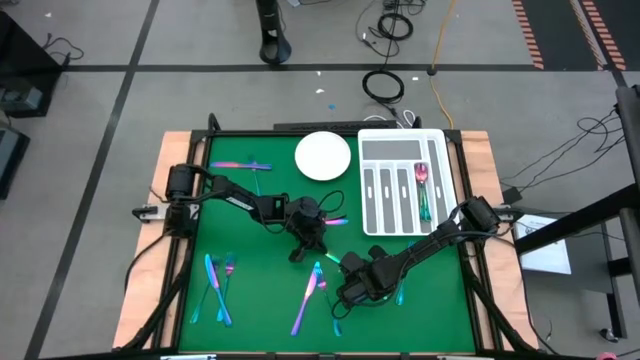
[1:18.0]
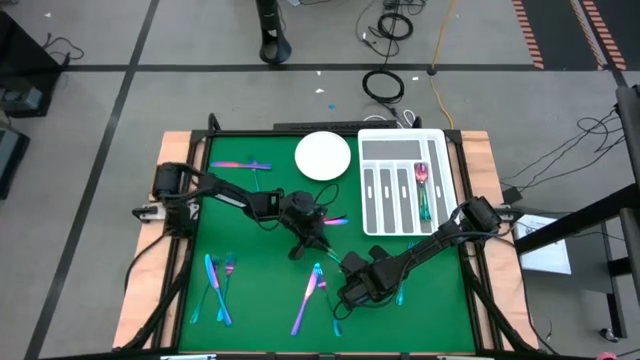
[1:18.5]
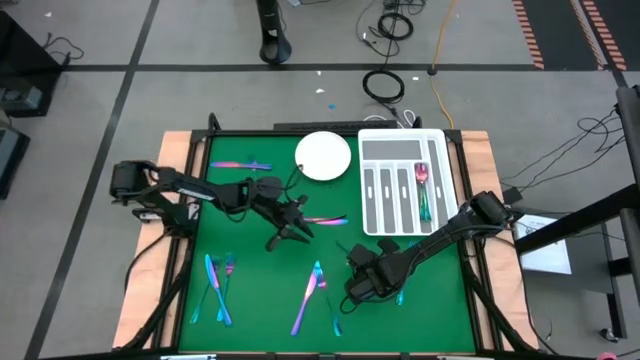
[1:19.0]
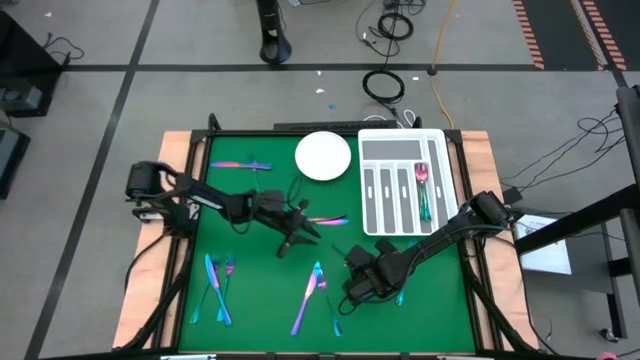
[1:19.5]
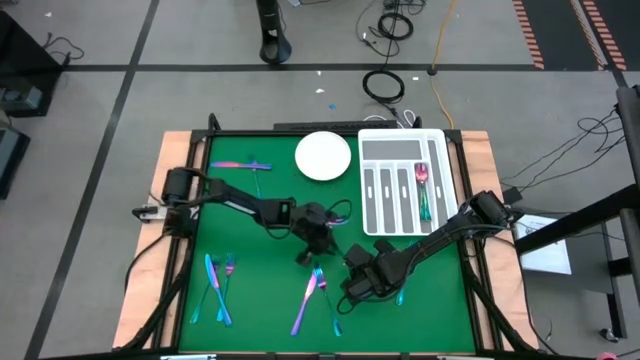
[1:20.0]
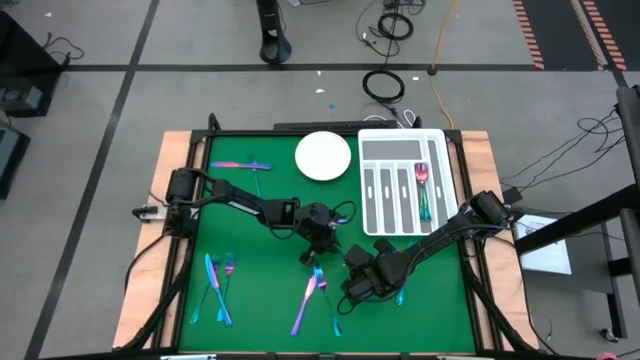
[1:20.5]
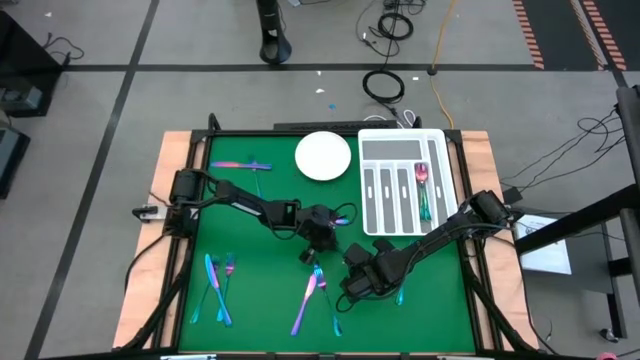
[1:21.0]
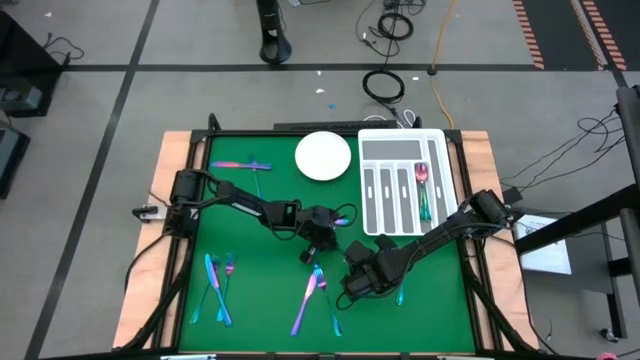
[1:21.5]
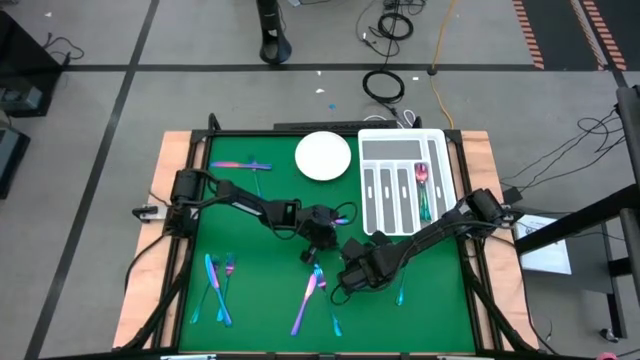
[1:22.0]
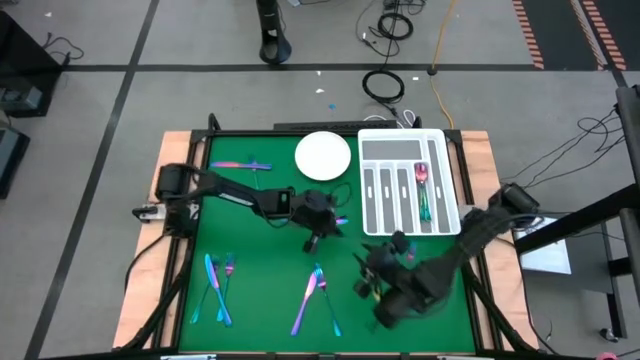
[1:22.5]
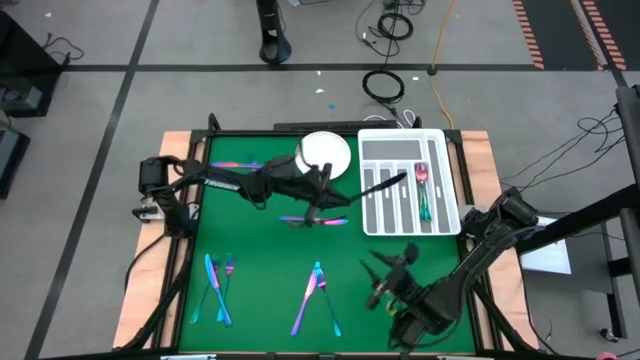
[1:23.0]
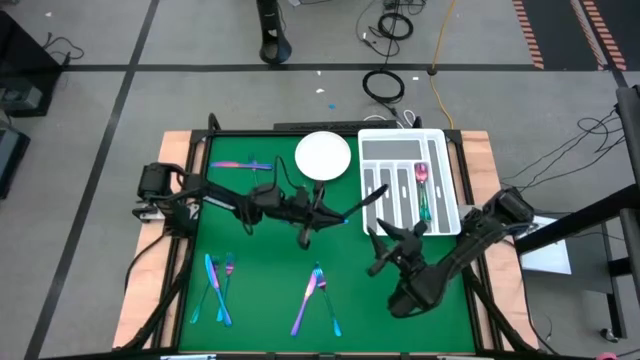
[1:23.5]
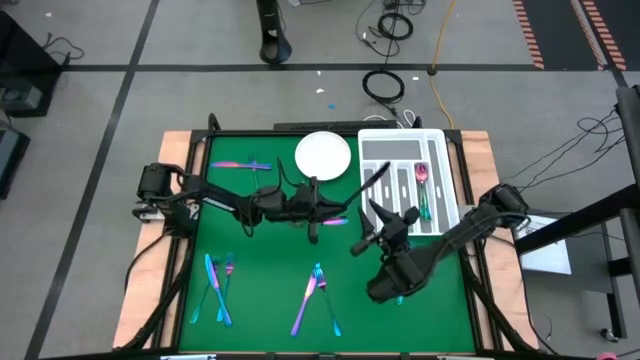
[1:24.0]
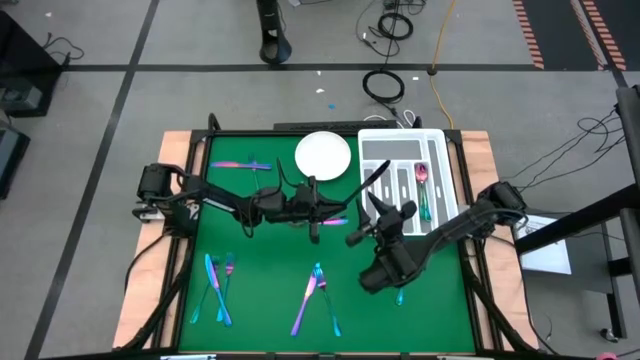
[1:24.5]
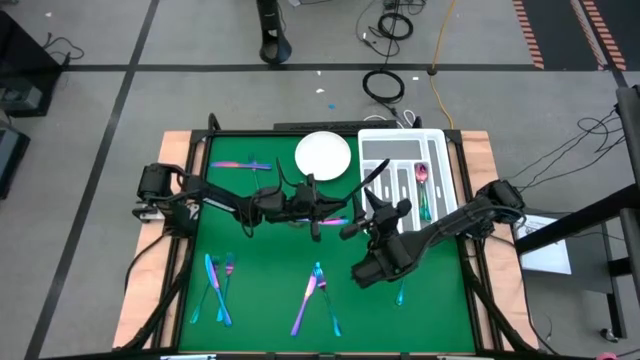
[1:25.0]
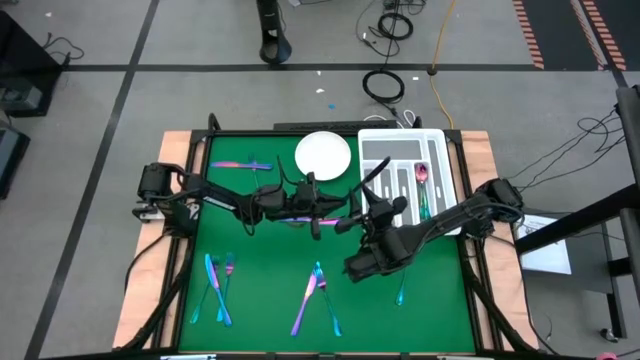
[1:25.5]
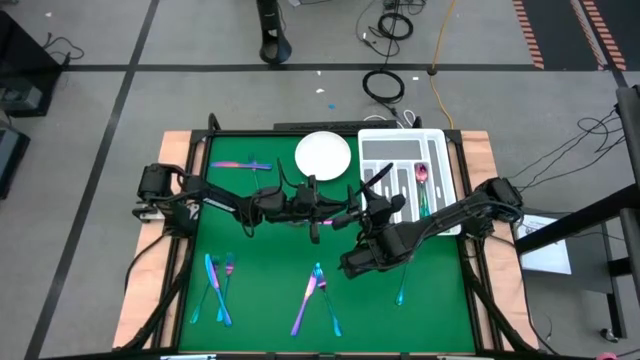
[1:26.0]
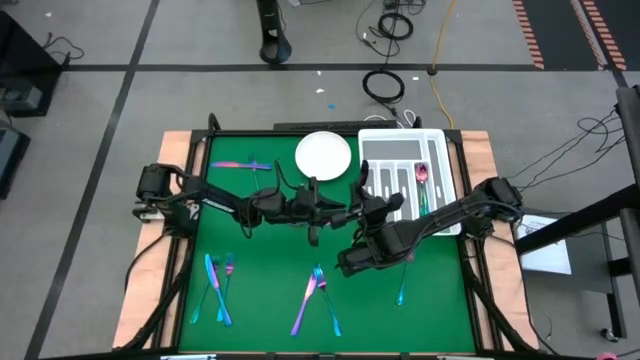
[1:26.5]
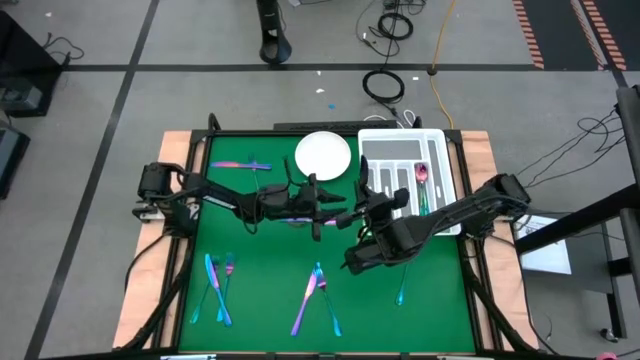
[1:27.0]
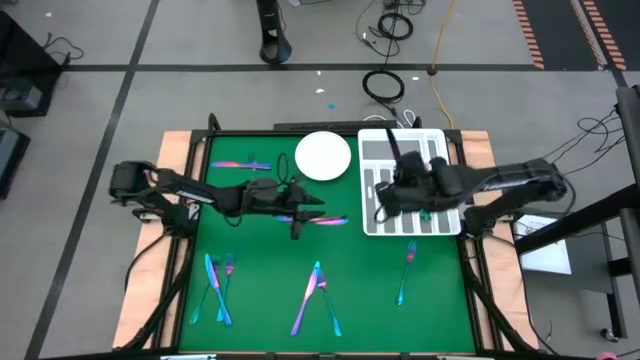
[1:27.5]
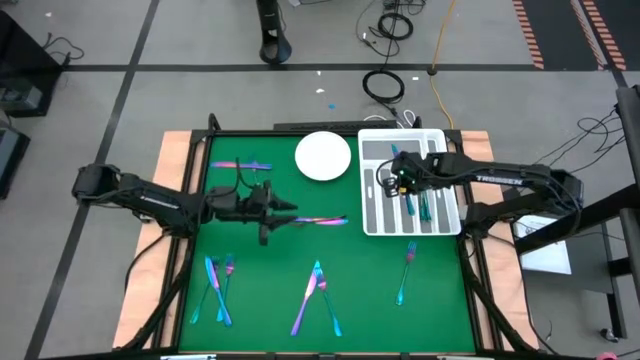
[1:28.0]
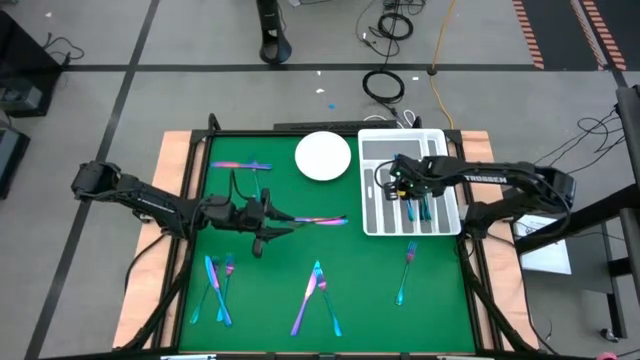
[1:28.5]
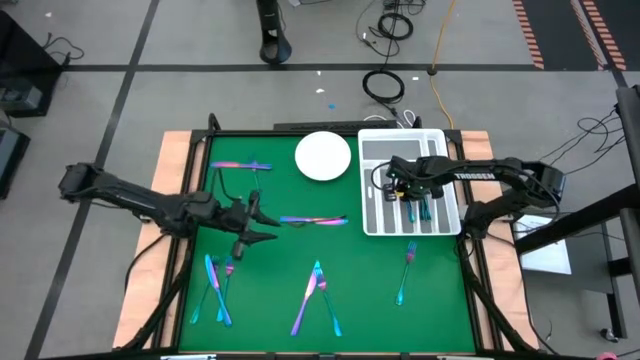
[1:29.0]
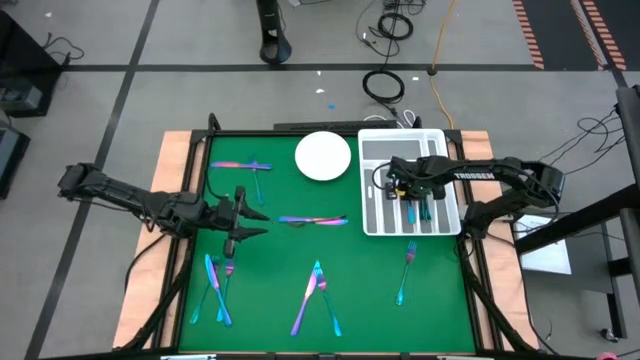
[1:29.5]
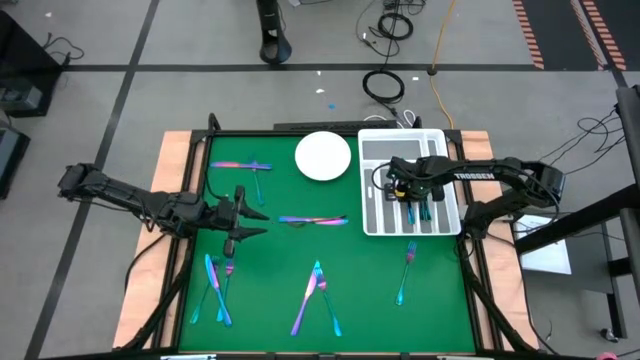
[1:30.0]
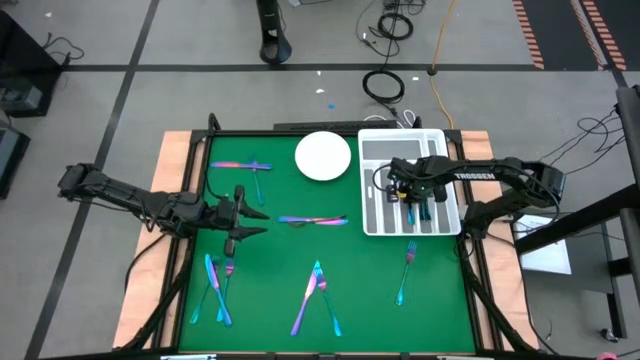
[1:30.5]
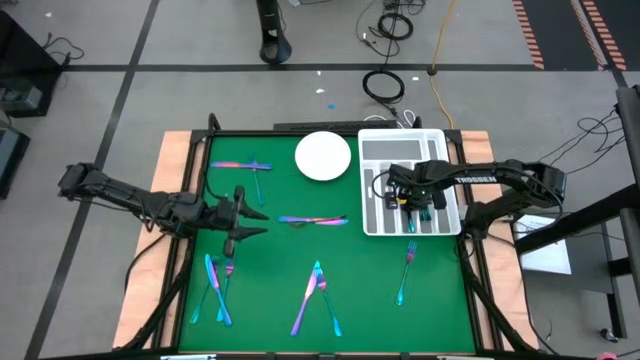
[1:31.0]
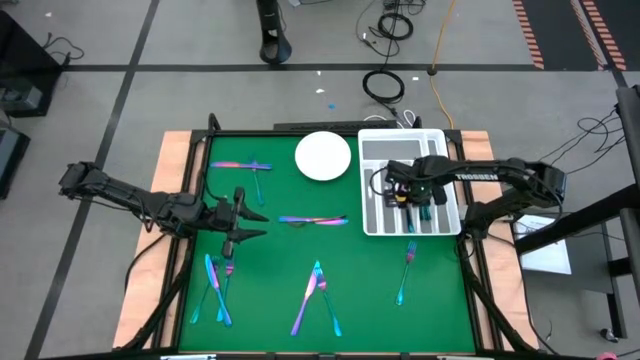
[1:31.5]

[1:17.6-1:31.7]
Task: Sort silverware
Put the iridescent knife into the white silverware tray

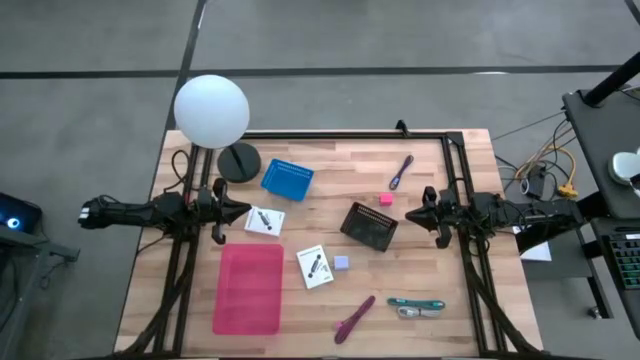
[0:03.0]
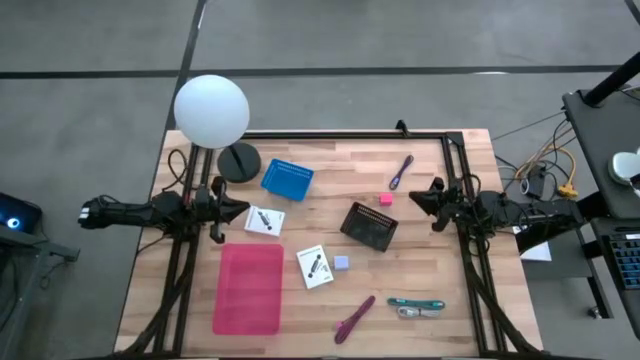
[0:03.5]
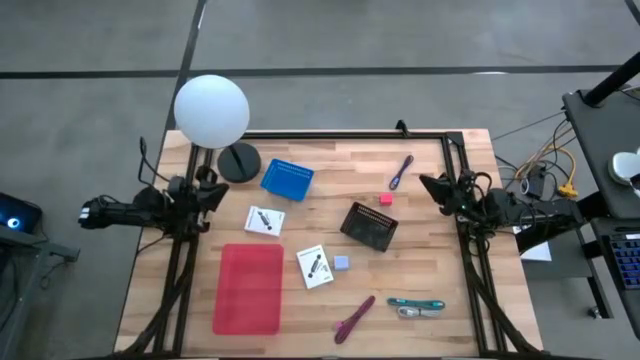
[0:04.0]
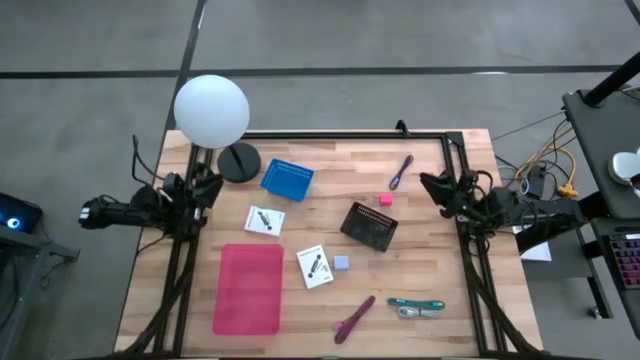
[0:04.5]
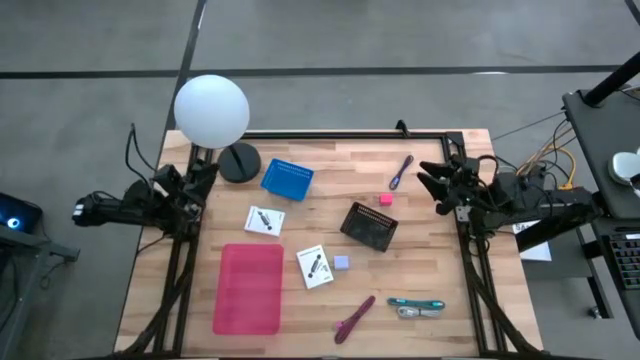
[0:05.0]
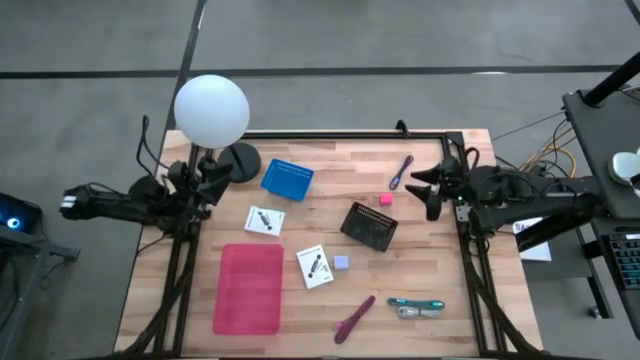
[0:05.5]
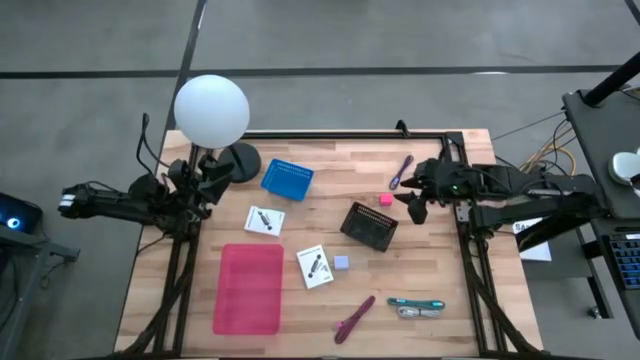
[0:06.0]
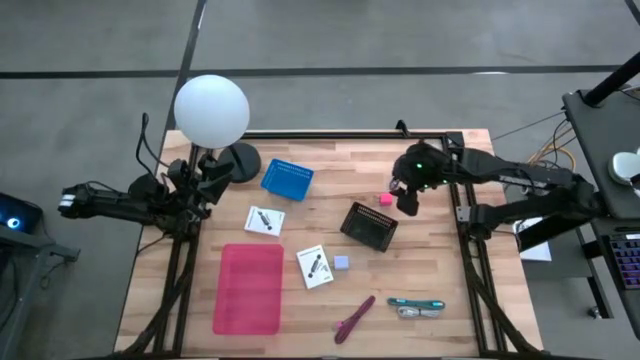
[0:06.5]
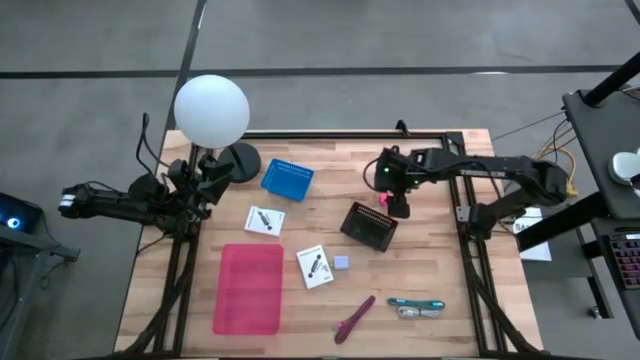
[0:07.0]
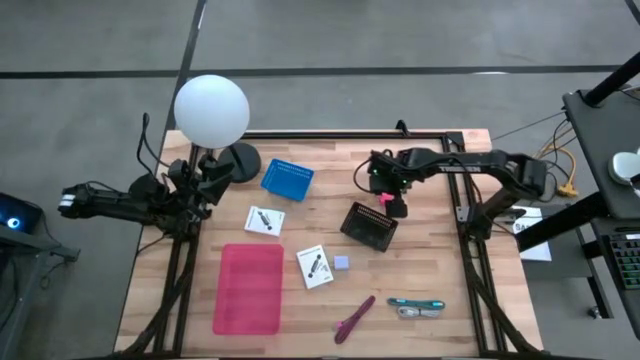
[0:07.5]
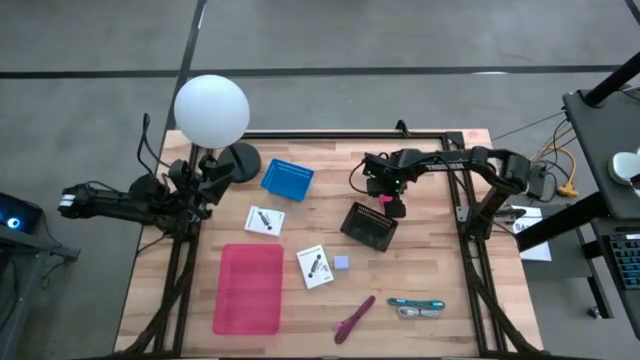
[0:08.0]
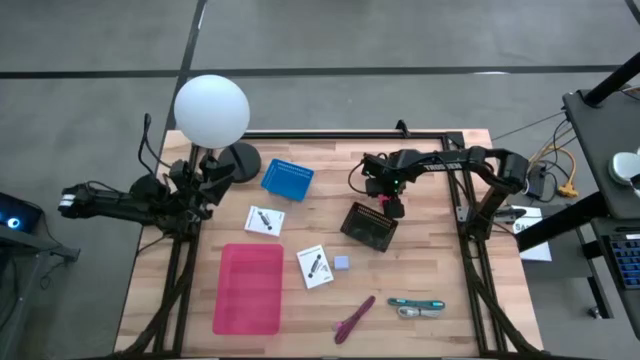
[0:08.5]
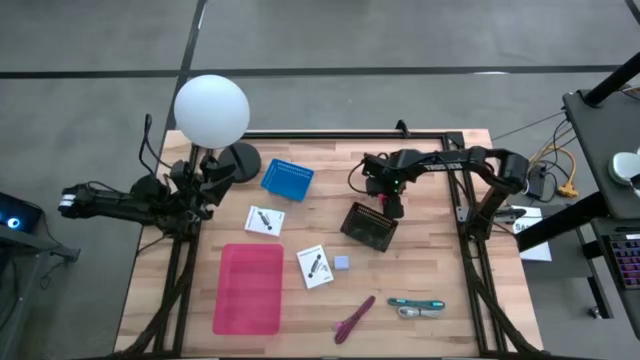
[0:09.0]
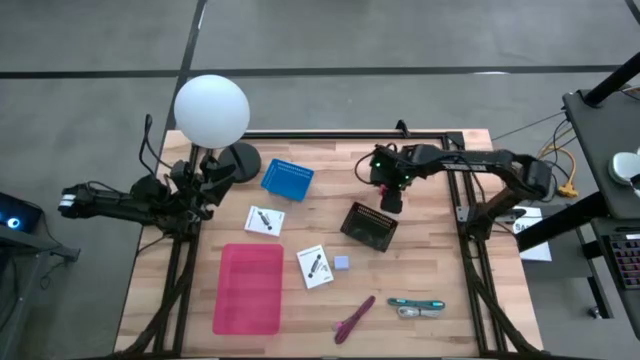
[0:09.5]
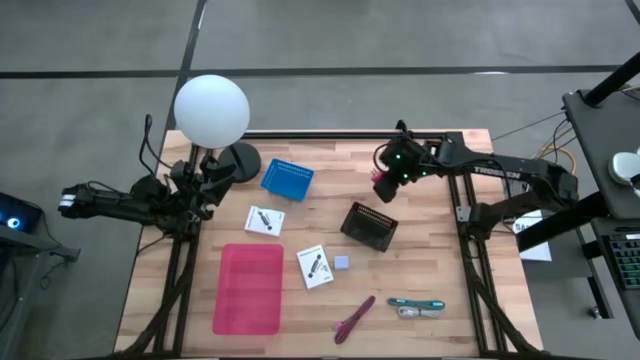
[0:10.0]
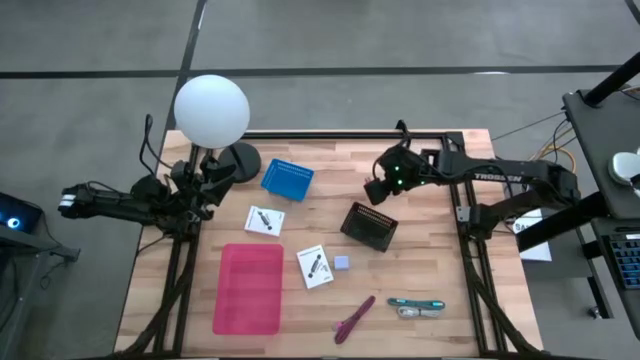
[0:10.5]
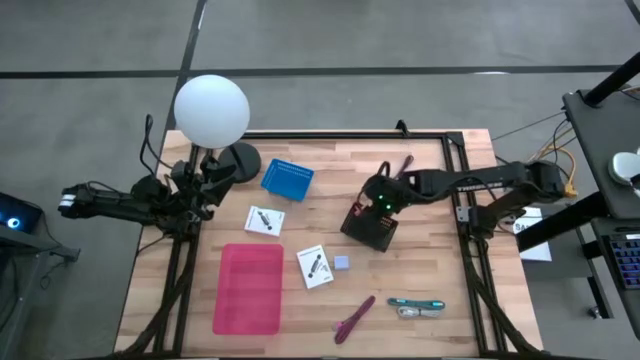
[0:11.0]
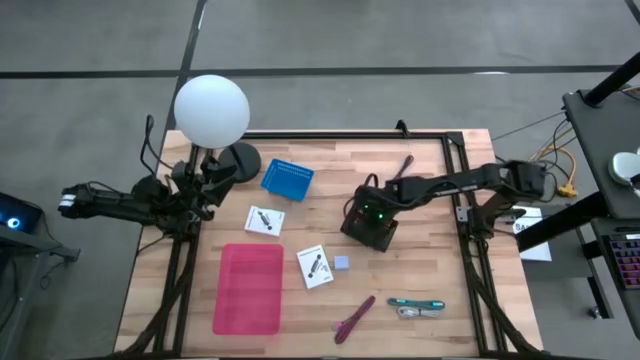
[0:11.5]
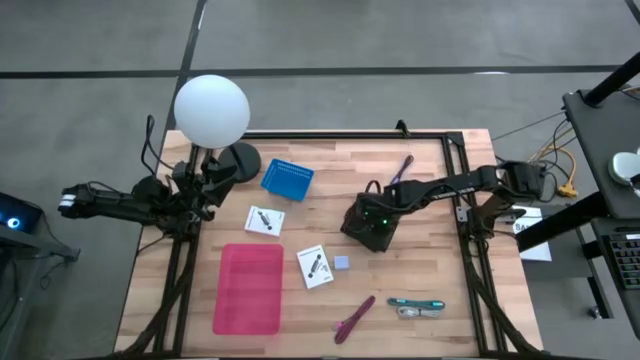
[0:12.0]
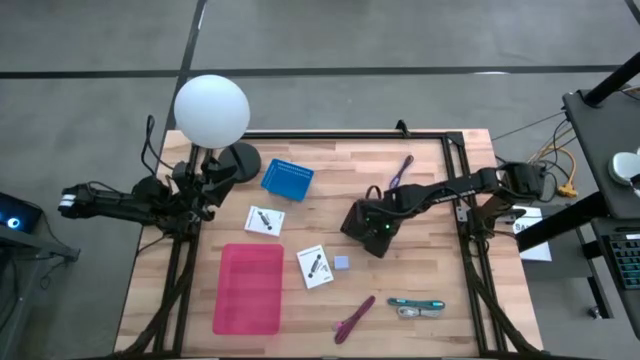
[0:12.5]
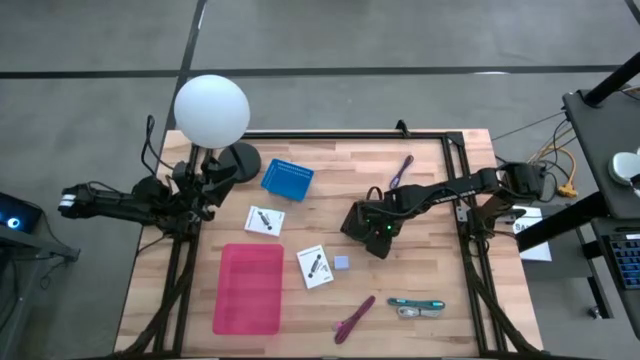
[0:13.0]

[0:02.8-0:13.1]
Task: Pick and place items into bin
Put the pink charger adapter into the black bin
